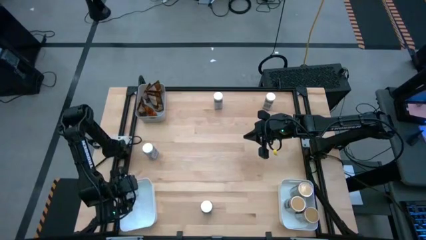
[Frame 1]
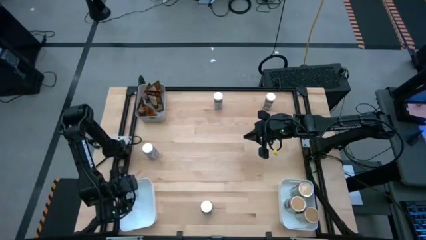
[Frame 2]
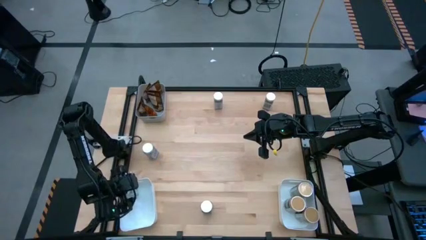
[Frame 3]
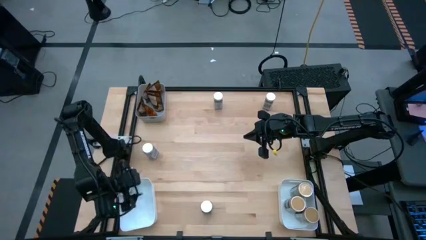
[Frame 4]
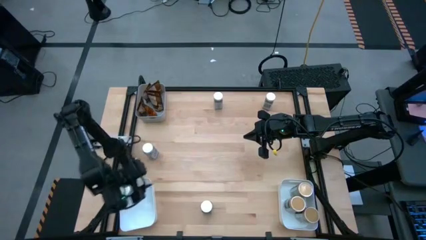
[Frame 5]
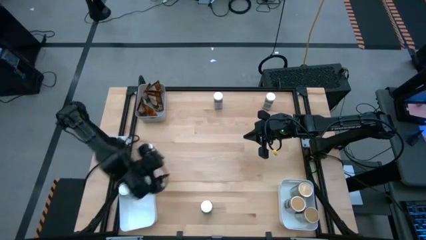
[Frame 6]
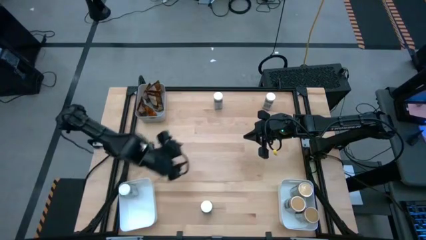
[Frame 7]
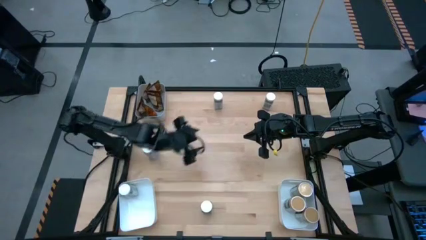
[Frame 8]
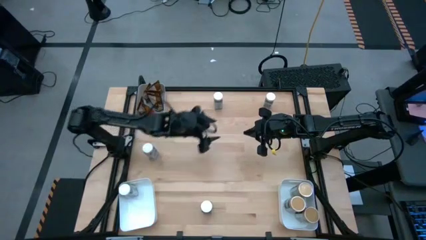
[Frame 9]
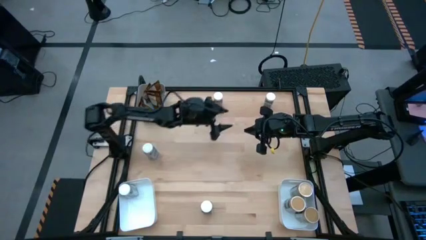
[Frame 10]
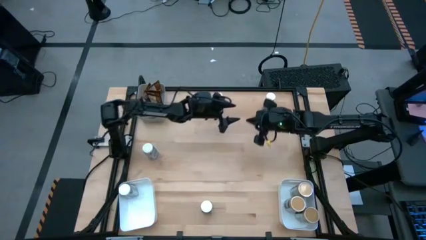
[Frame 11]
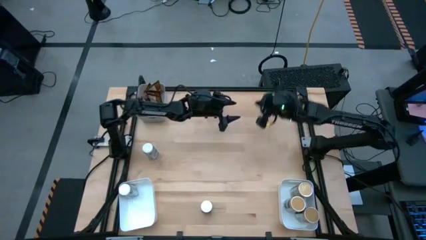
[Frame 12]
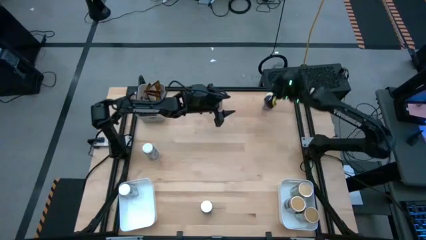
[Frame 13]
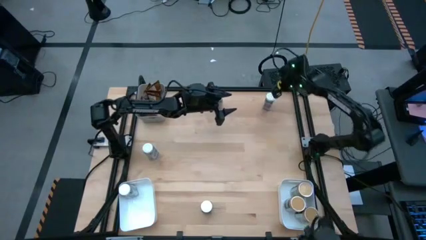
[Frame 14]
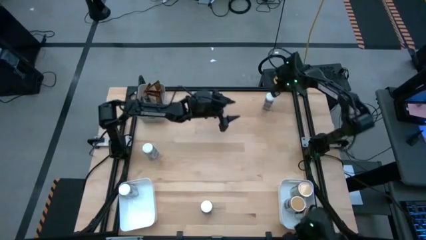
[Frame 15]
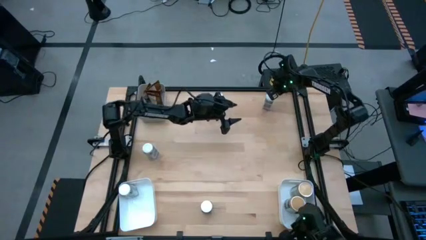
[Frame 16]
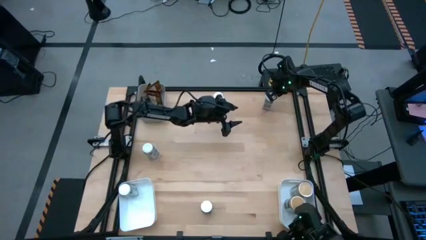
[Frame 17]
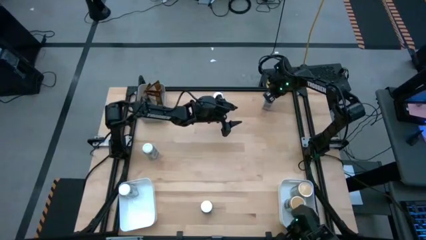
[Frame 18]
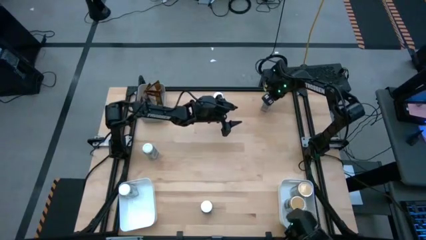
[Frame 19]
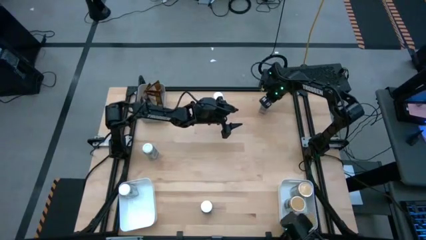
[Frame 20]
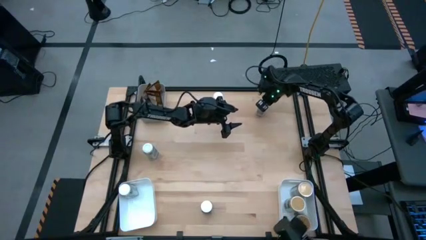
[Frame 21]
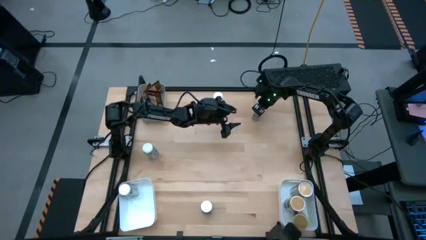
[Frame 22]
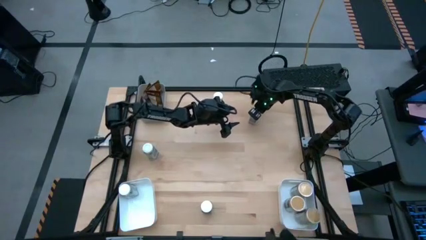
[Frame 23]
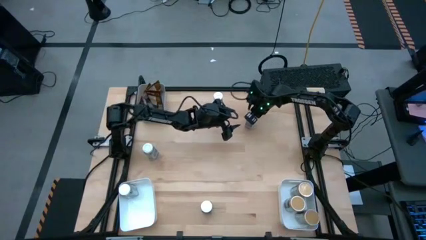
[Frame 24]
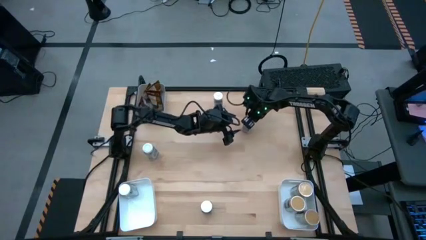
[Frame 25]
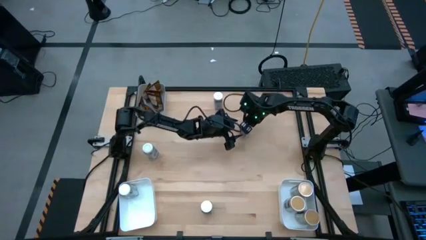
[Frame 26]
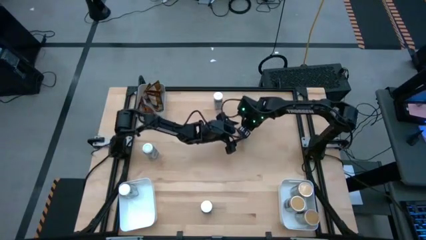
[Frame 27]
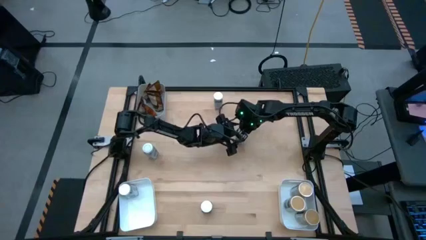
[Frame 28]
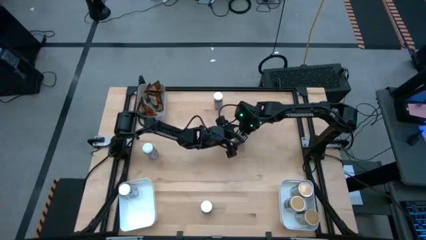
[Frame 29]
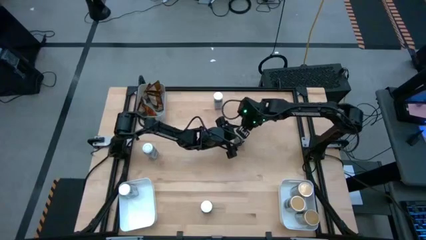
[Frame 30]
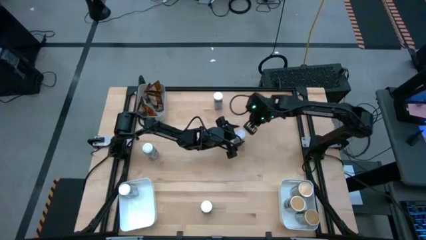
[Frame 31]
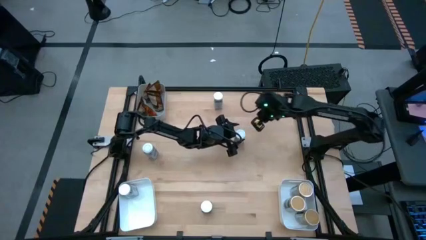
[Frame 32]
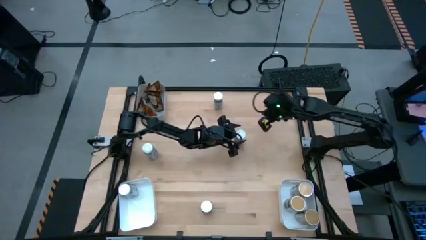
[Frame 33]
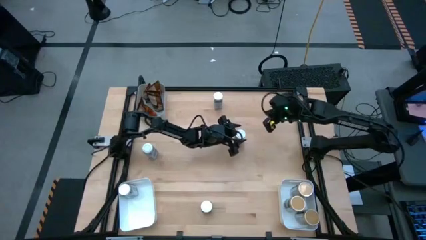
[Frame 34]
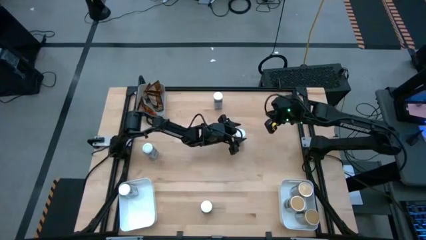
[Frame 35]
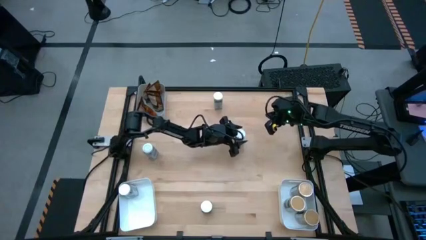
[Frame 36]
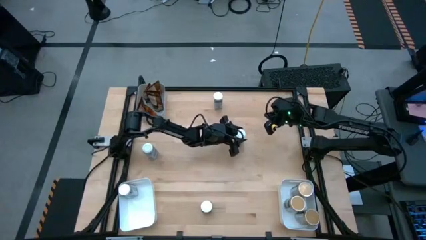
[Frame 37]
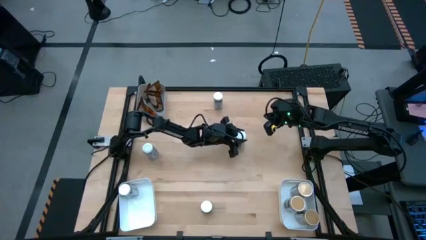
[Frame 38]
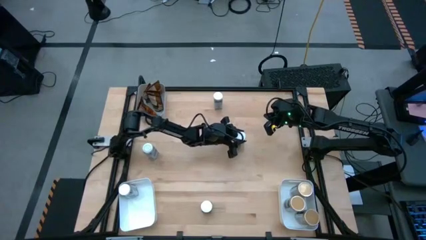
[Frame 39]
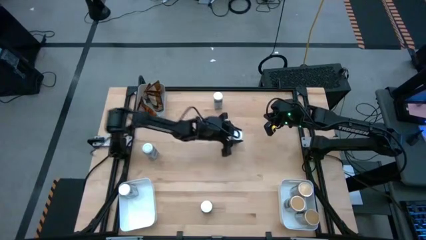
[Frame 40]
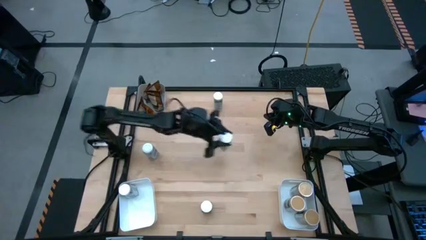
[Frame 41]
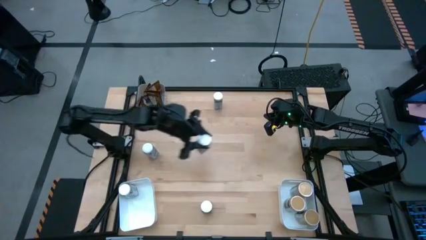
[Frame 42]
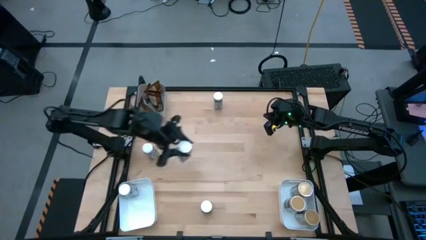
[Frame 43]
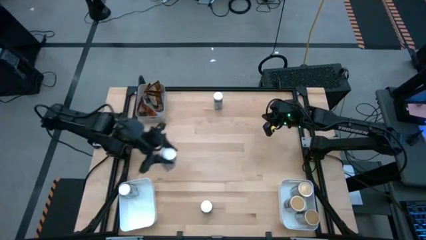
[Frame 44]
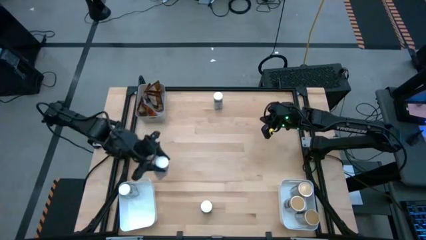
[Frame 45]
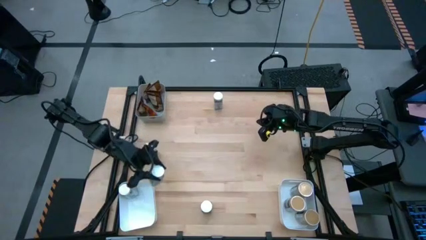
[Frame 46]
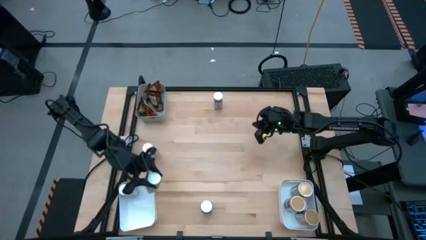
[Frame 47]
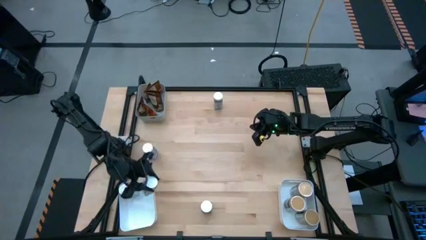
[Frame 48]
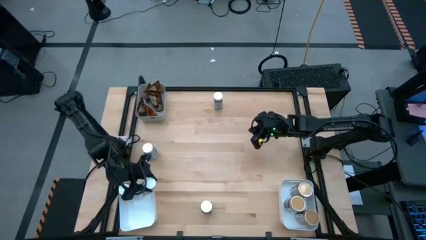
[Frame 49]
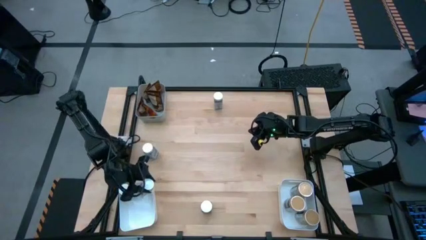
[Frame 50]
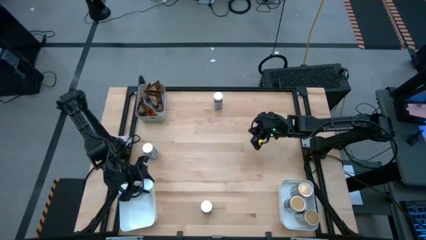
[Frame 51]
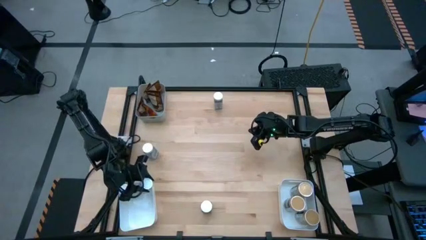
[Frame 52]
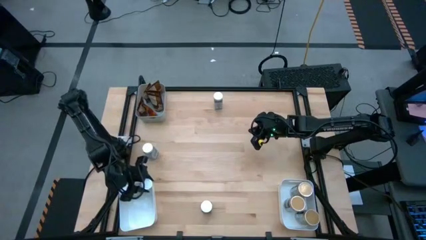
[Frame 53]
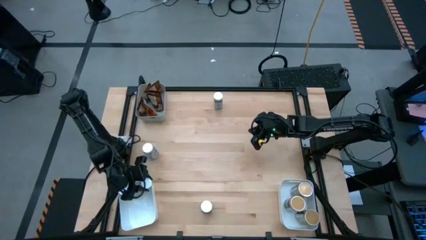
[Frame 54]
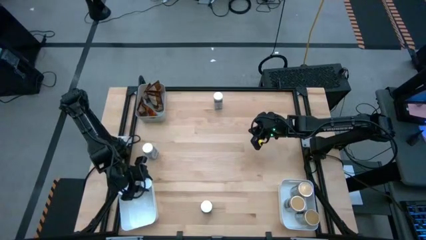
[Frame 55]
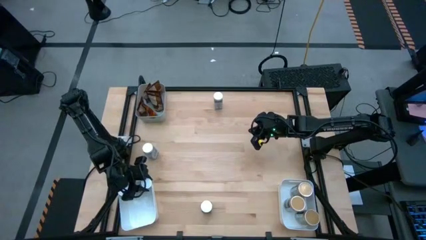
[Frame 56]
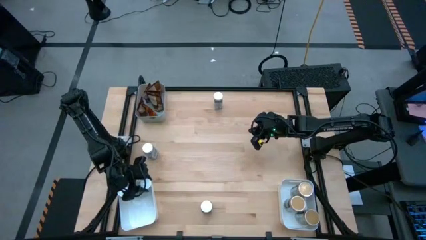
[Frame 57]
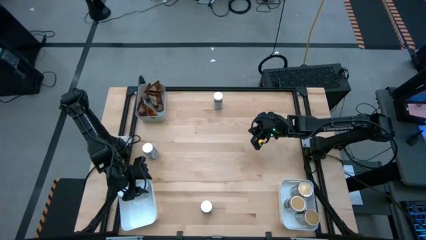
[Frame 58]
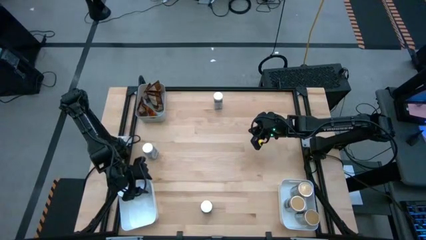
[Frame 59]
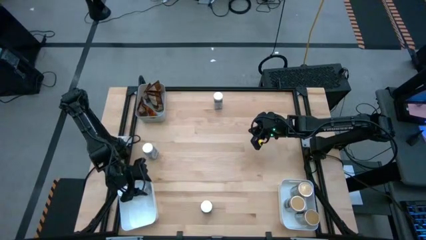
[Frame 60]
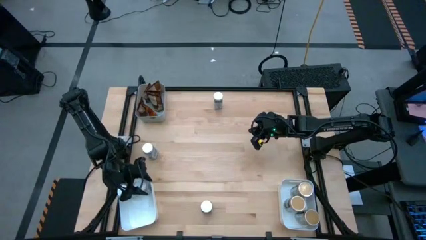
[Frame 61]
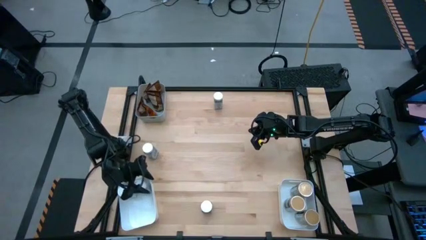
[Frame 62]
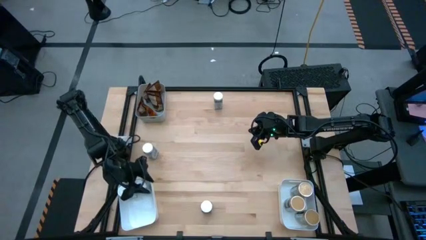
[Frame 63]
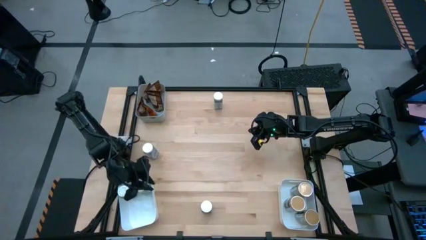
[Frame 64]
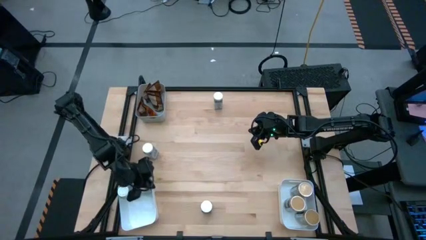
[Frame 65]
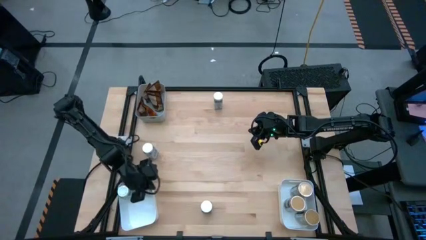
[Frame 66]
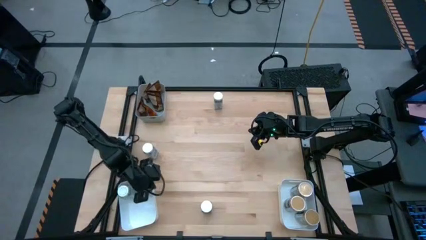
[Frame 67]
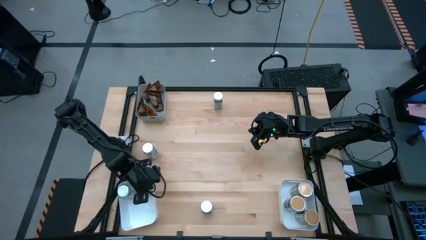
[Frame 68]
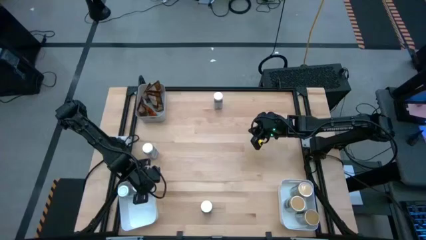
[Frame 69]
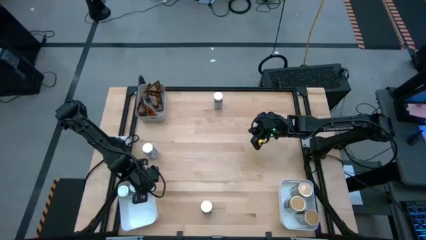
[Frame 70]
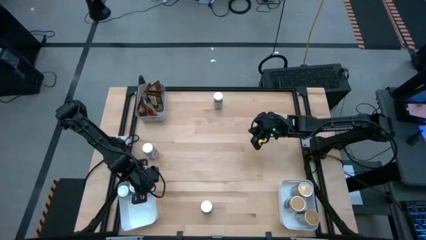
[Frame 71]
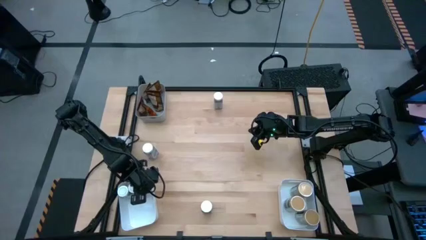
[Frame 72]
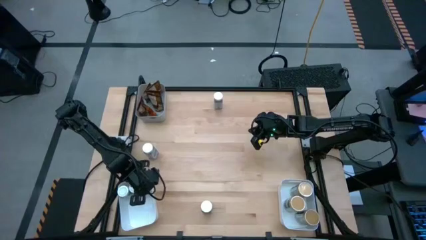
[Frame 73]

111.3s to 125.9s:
Task: Sort spices by type
Put the white seasoning bottle into the bottom left white bin
